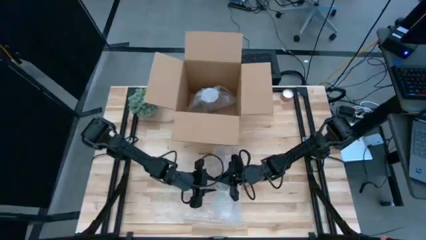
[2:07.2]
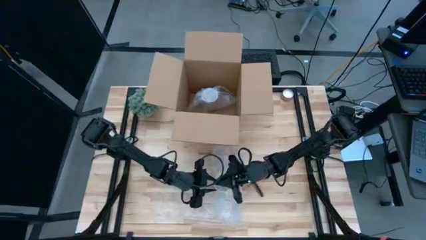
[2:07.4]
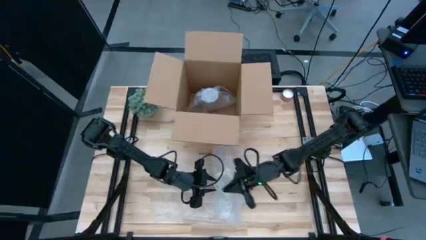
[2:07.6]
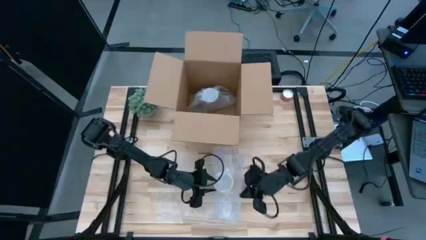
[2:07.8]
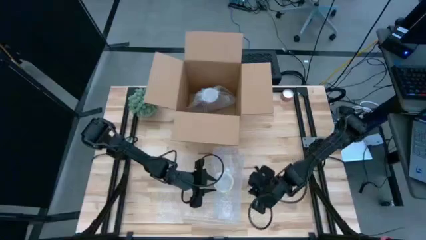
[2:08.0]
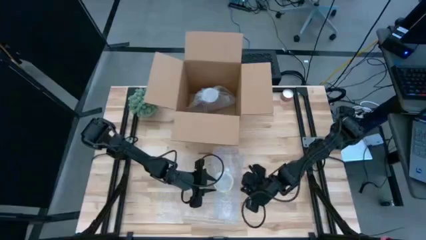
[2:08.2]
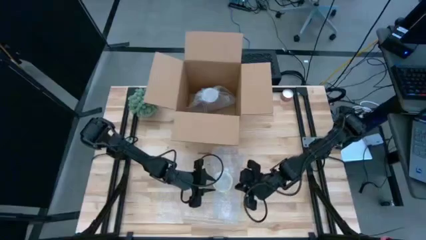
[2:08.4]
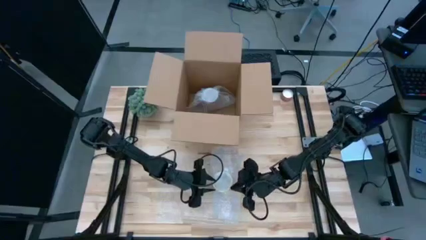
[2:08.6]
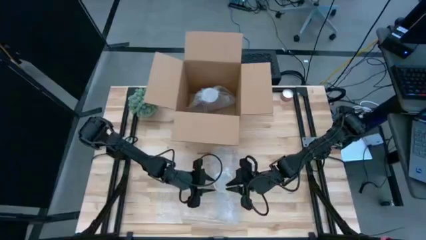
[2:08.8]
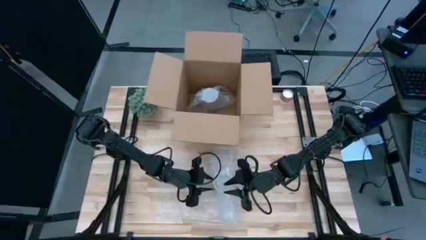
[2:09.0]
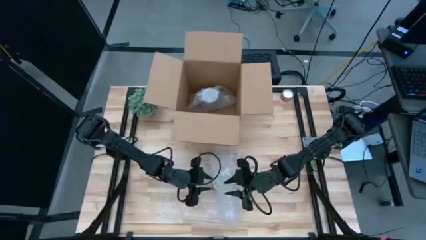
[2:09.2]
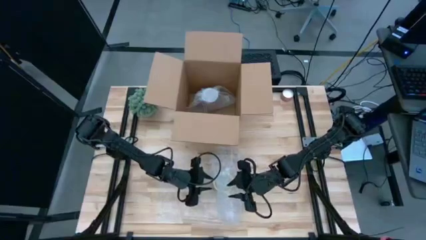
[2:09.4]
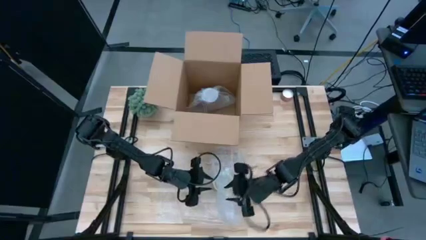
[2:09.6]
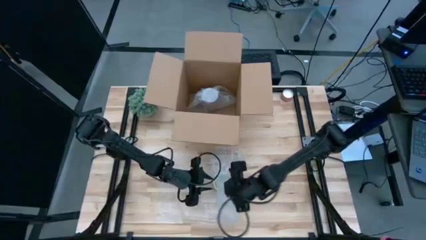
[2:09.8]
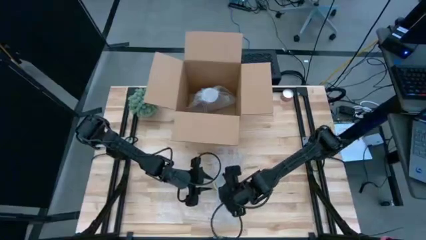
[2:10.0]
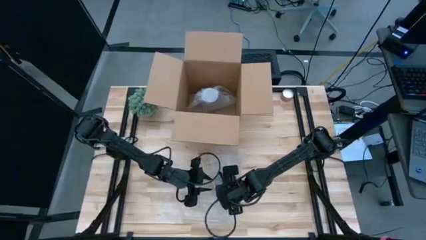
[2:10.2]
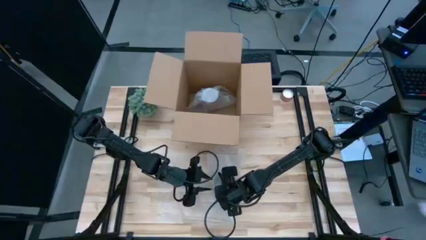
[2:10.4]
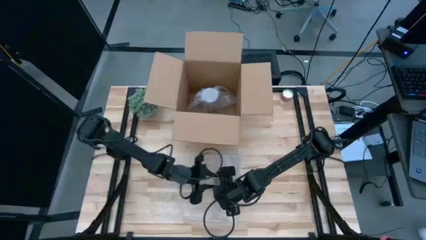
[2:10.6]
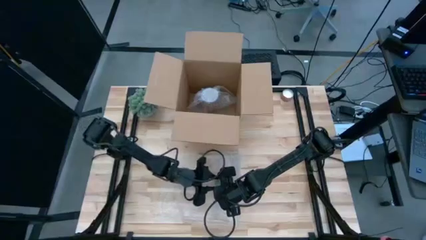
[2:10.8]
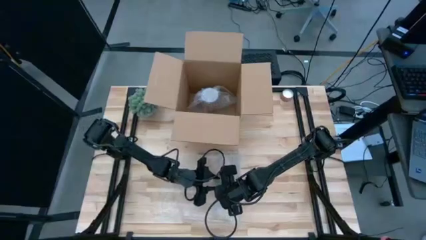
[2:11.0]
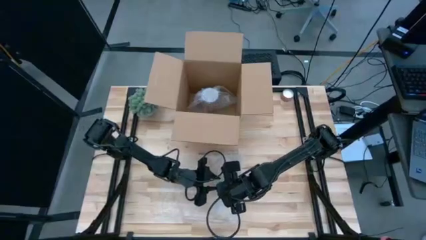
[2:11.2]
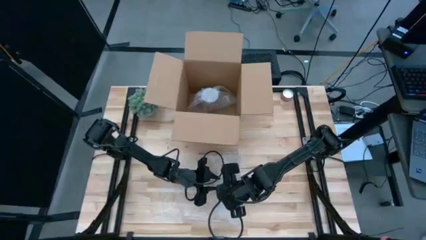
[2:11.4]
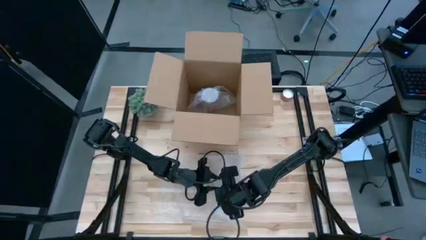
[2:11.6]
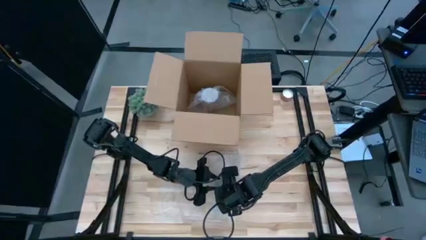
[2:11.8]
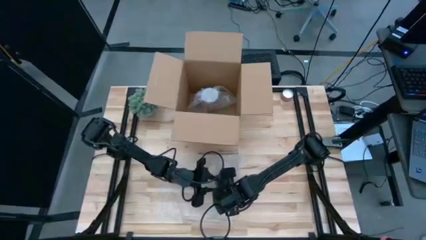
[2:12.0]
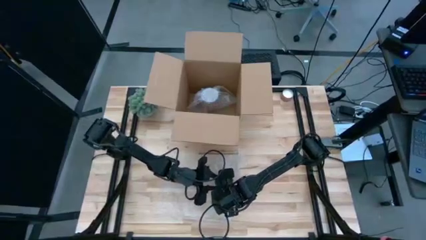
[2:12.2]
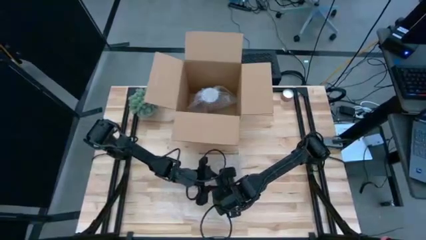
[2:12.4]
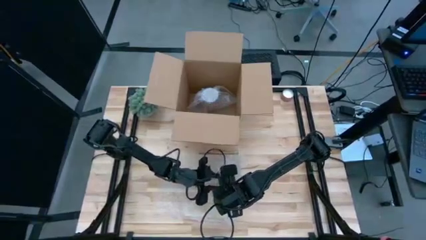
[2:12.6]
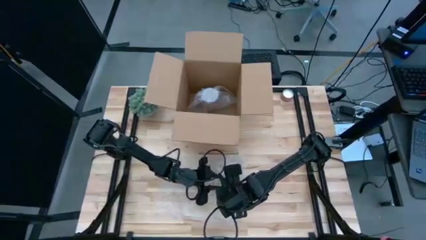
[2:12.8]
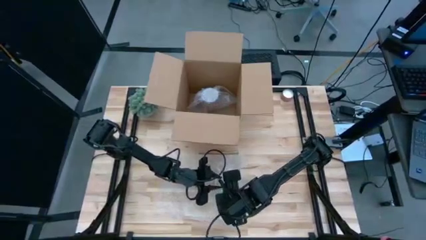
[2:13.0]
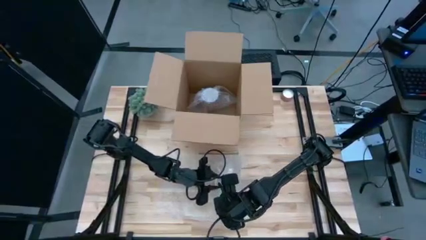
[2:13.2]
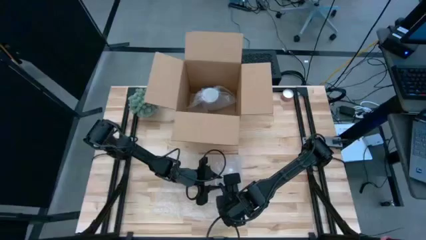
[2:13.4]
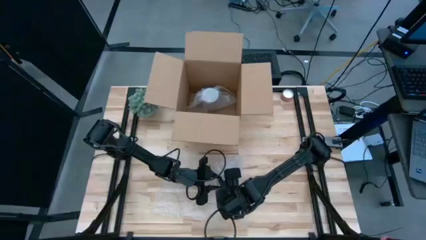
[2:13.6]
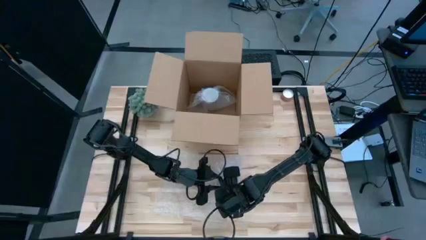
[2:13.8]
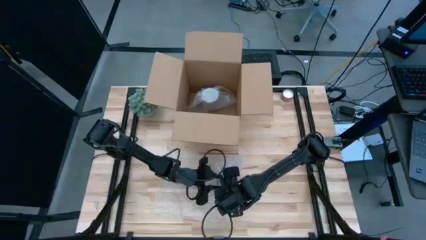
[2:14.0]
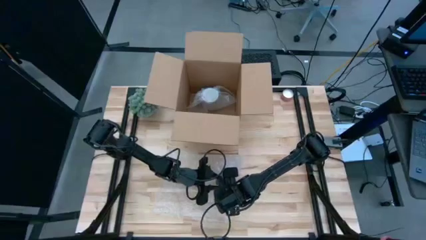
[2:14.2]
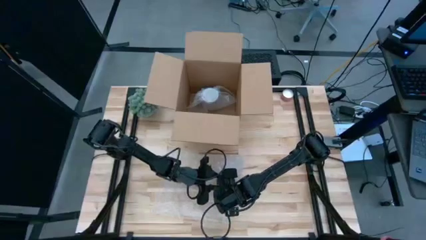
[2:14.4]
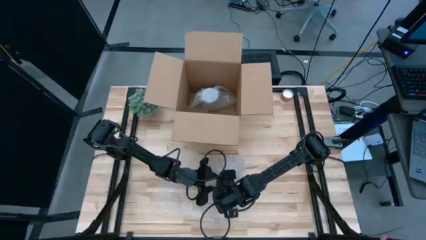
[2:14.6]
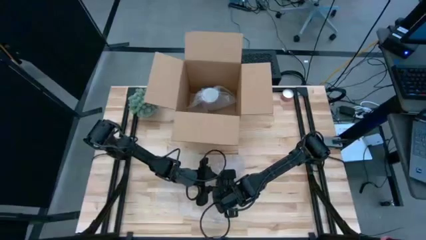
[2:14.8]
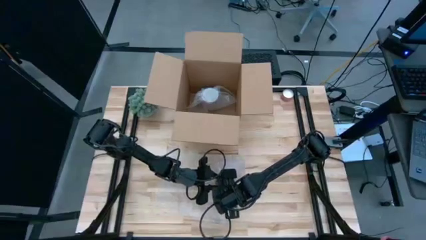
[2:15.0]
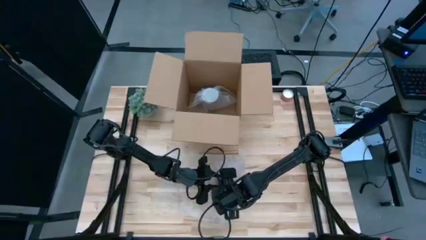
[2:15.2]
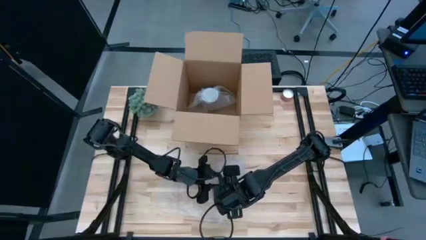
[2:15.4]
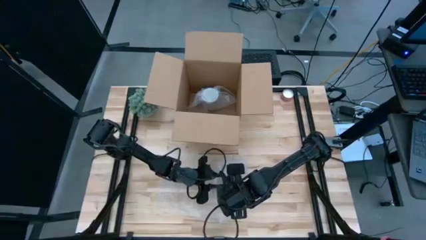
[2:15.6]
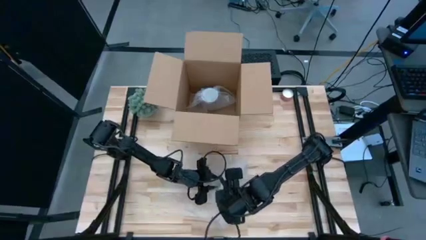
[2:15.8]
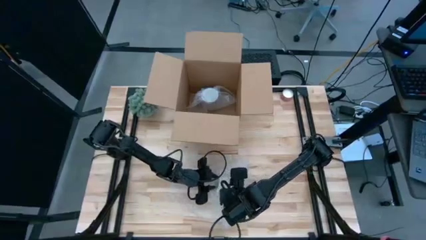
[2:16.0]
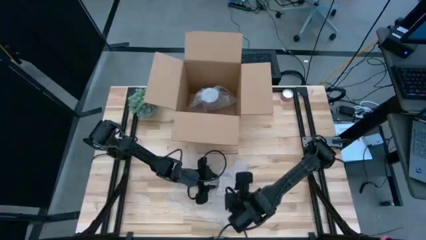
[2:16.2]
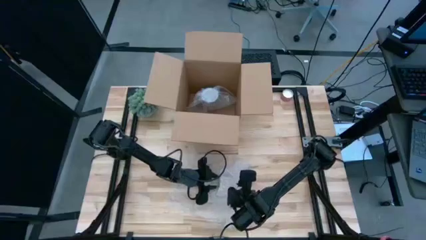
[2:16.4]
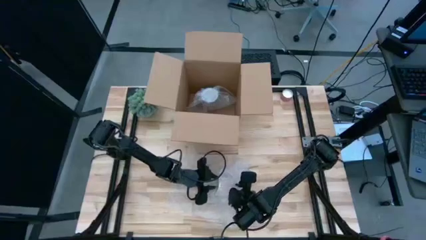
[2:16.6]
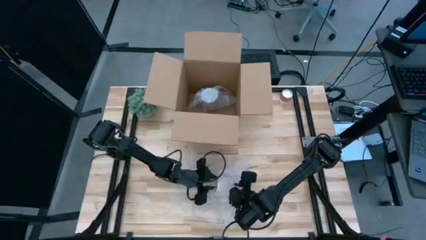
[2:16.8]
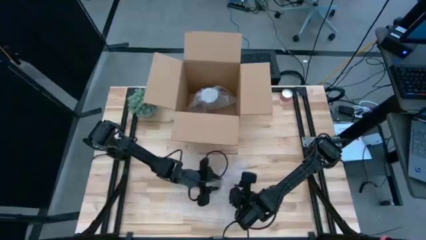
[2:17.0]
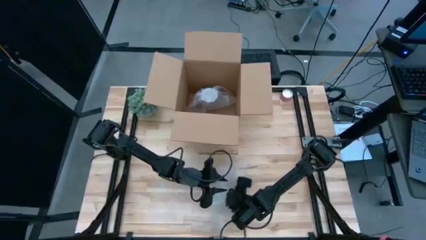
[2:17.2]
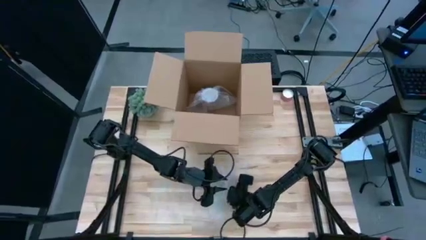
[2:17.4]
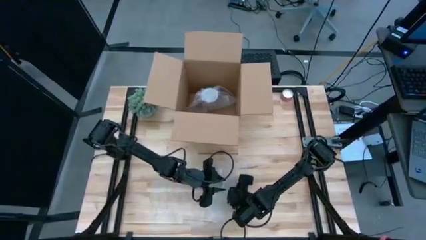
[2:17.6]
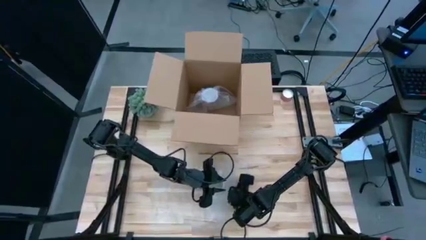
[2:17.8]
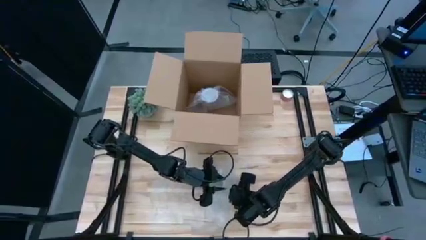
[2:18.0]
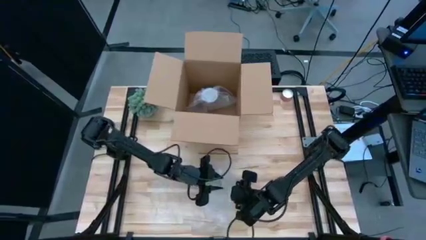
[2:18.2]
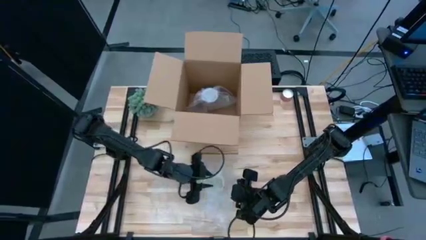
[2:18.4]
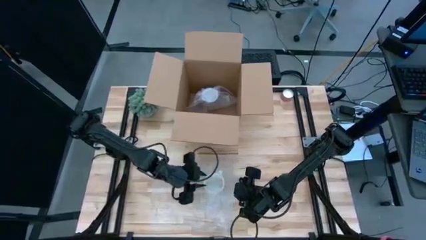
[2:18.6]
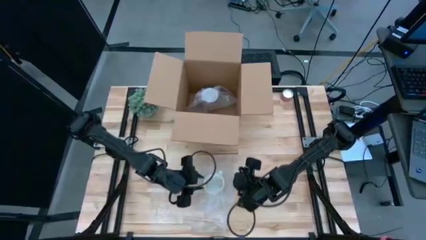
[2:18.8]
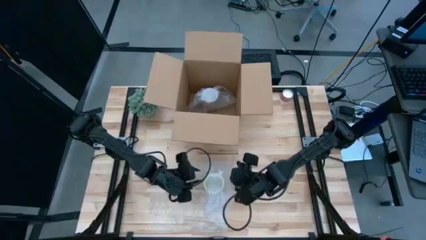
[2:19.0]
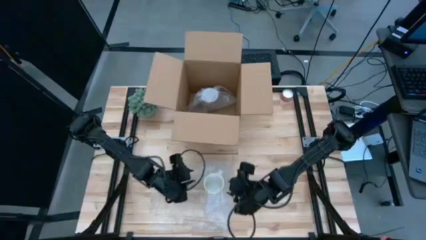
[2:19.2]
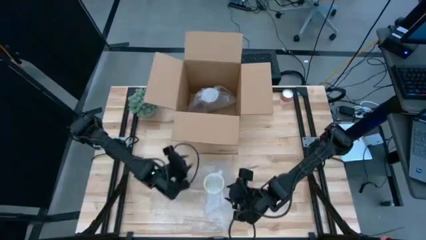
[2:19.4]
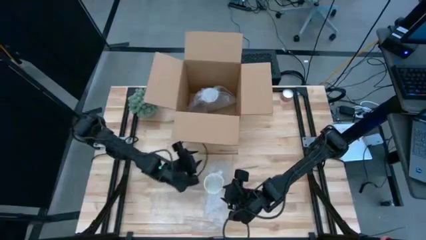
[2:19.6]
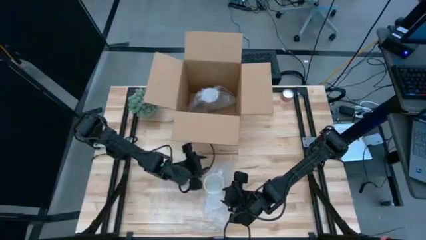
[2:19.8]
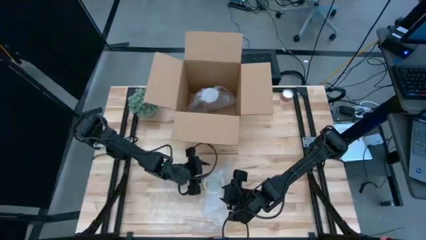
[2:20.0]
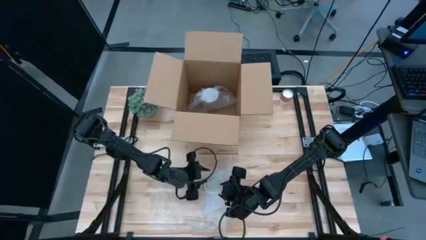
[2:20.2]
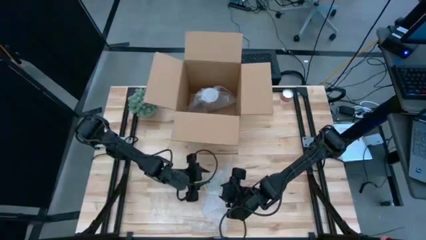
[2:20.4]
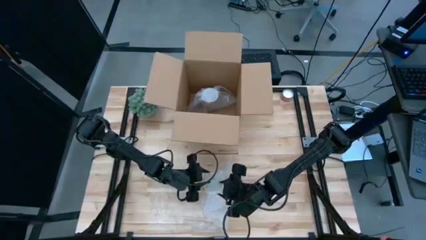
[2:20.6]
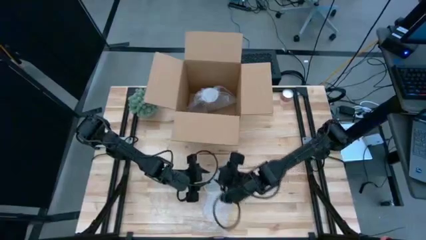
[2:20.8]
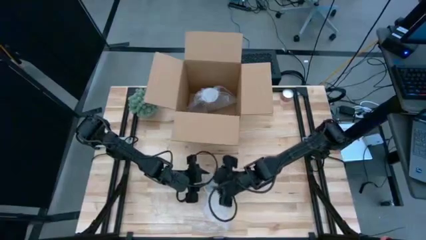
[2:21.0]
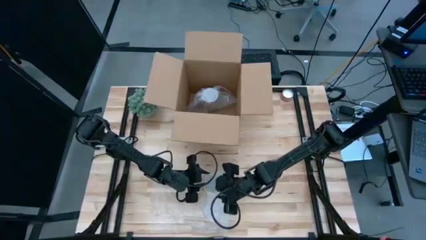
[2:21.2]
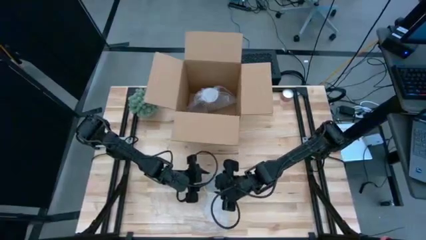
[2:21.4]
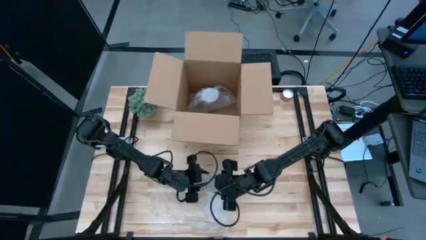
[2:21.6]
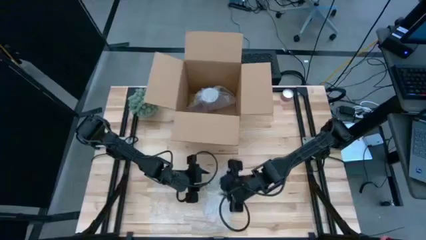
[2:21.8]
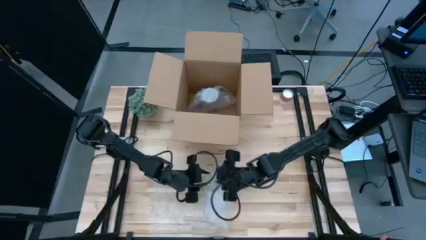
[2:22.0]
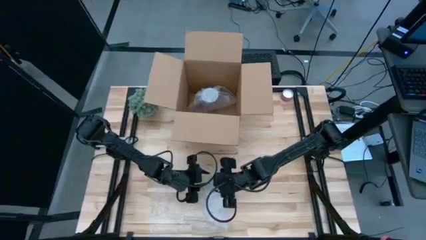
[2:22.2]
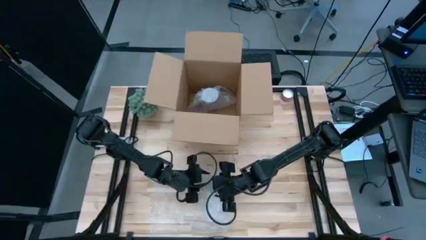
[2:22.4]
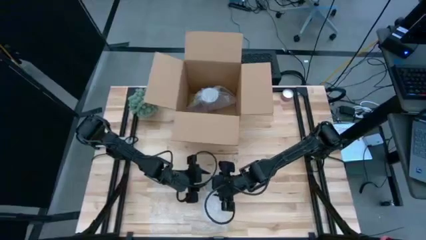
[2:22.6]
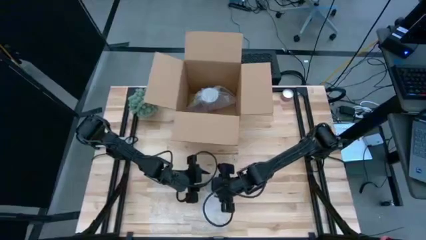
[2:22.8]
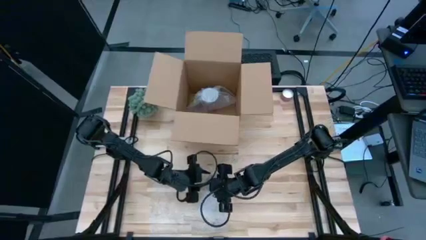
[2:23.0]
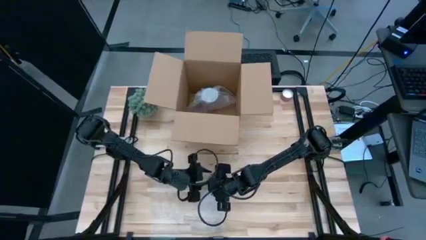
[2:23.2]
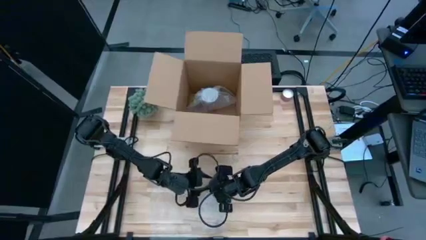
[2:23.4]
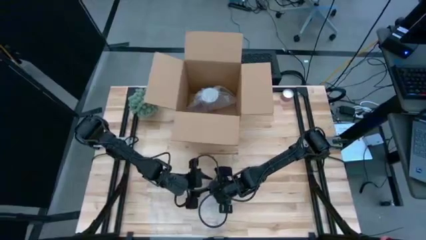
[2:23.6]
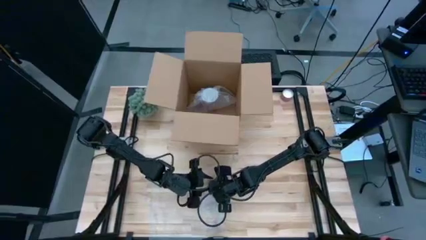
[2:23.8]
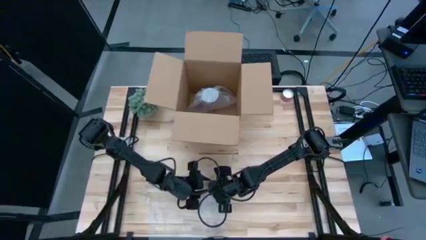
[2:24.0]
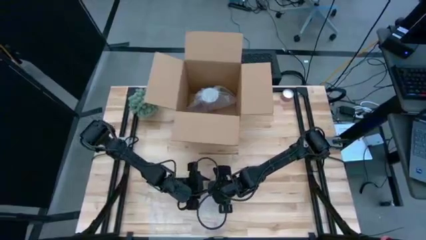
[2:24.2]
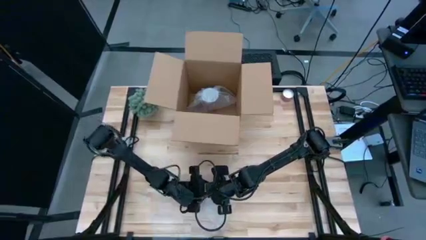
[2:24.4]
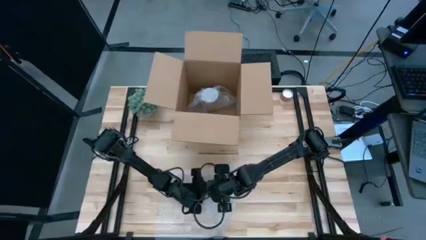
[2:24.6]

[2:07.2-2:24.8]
Task: wrap mug
Wrap the yellow patterned mug with bubble wrap
